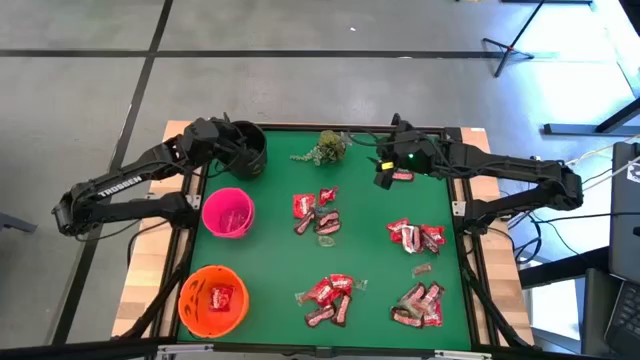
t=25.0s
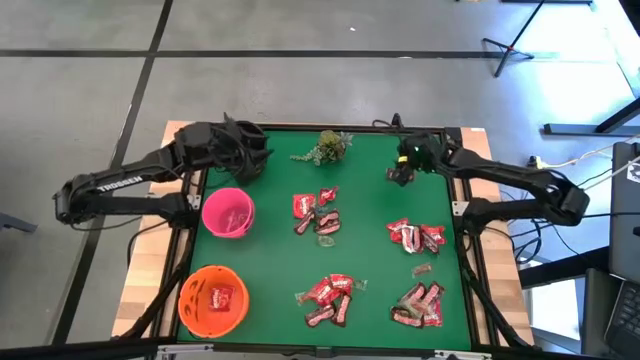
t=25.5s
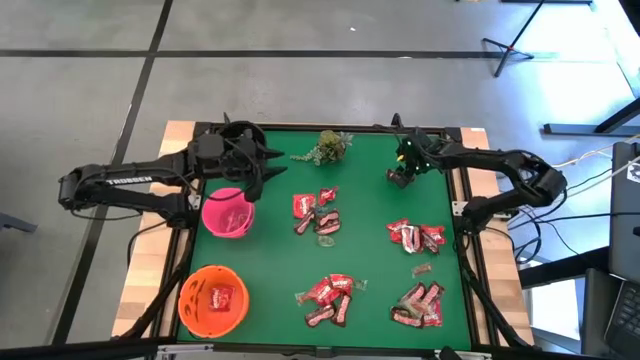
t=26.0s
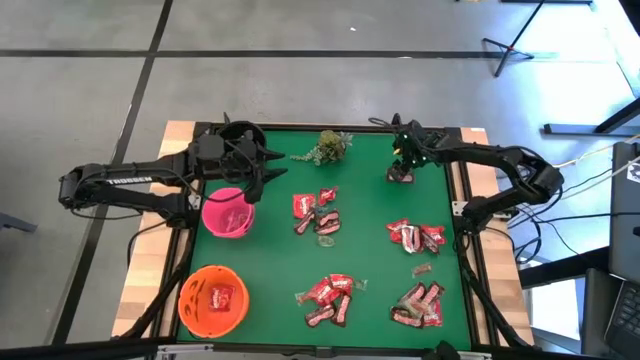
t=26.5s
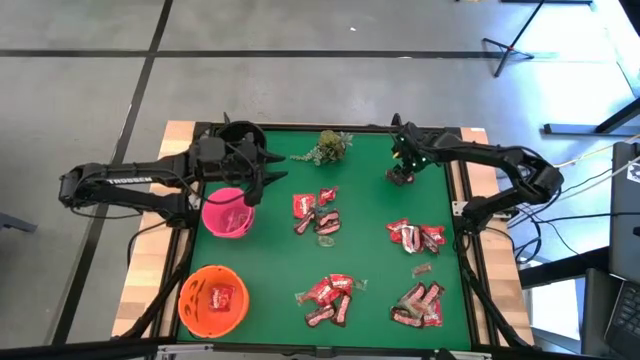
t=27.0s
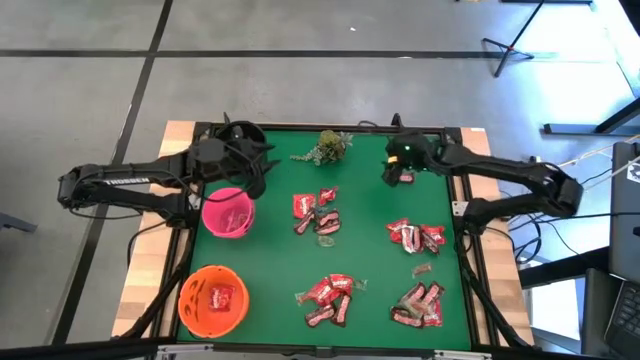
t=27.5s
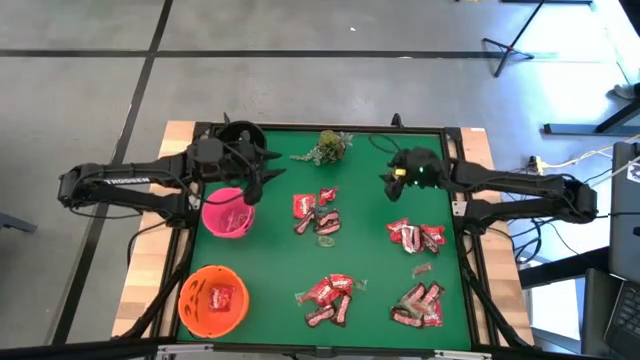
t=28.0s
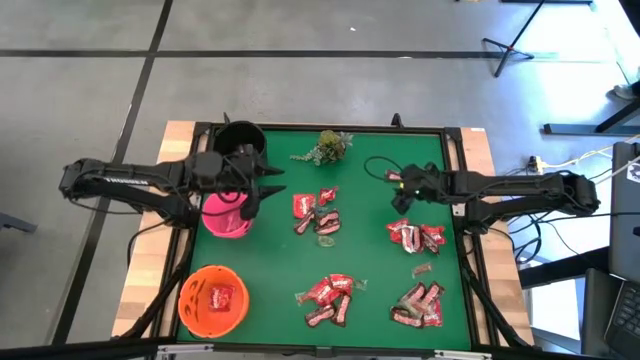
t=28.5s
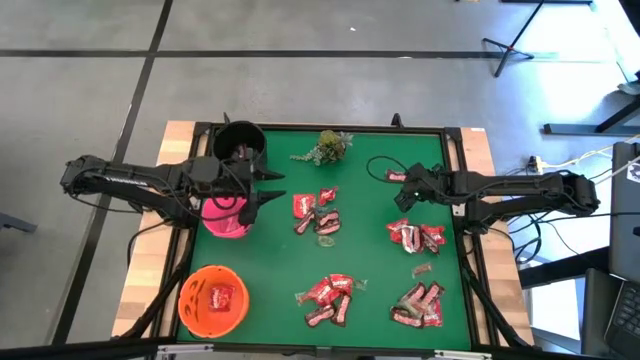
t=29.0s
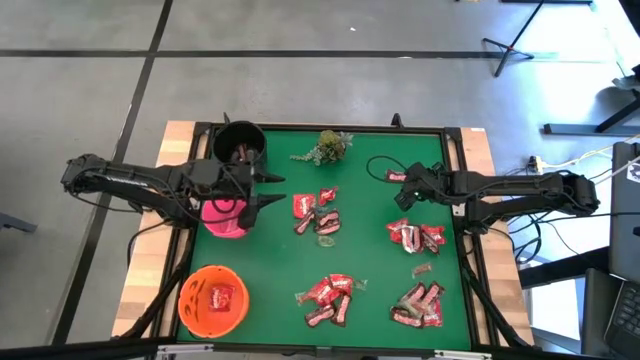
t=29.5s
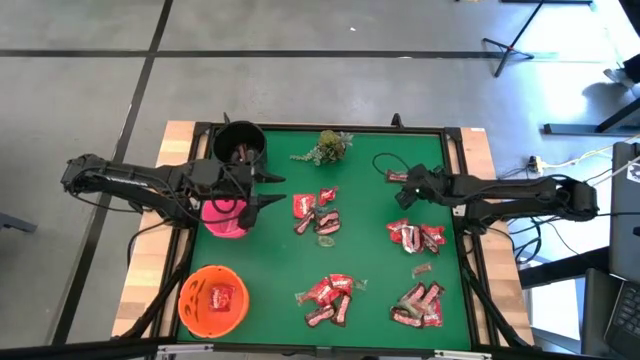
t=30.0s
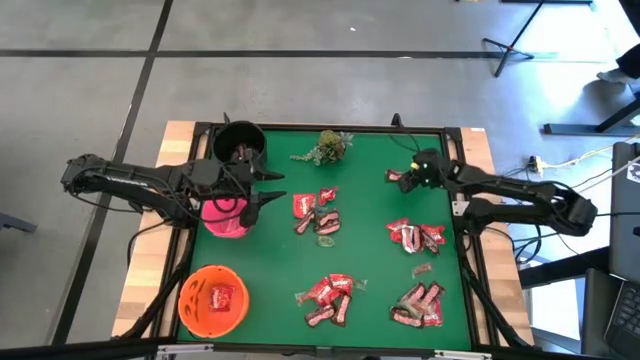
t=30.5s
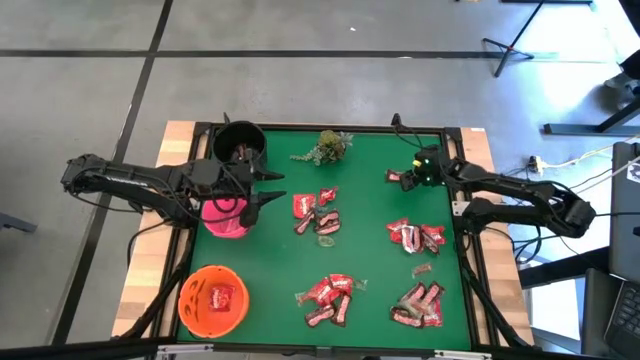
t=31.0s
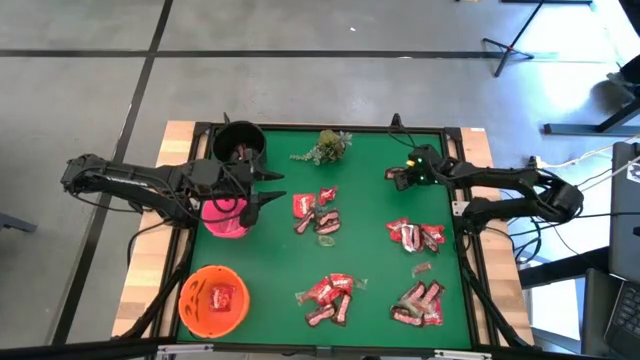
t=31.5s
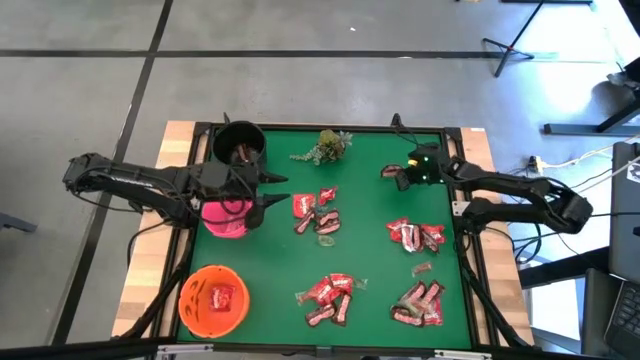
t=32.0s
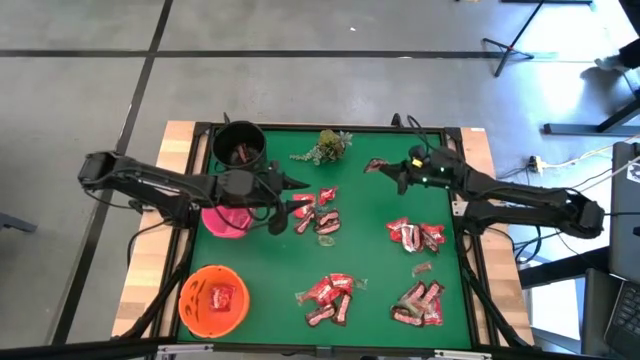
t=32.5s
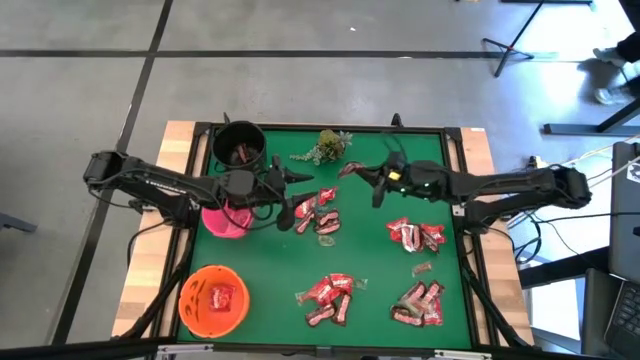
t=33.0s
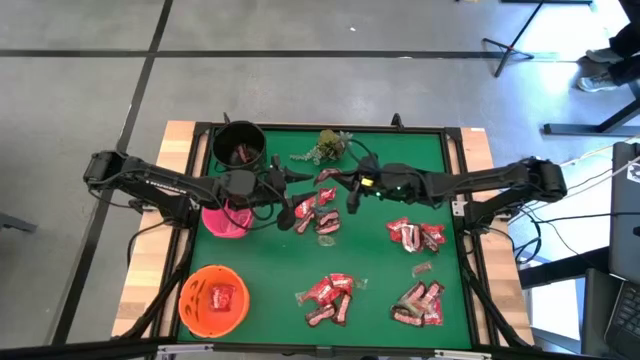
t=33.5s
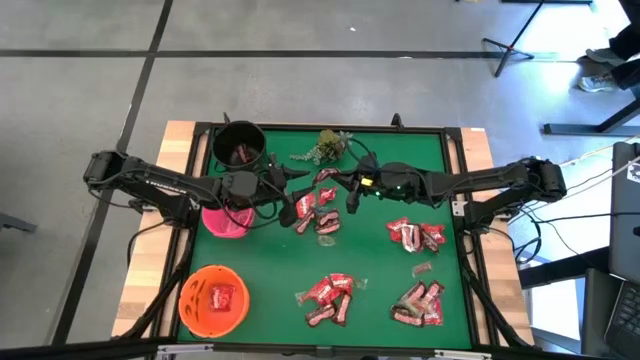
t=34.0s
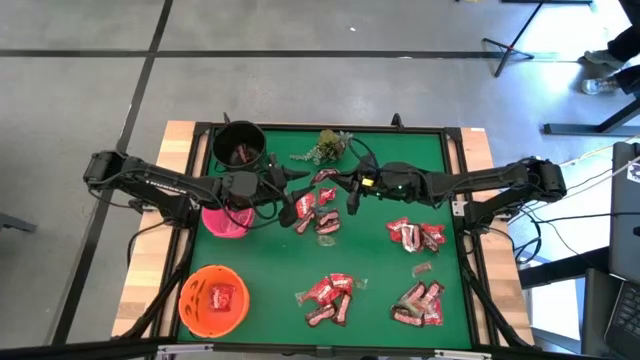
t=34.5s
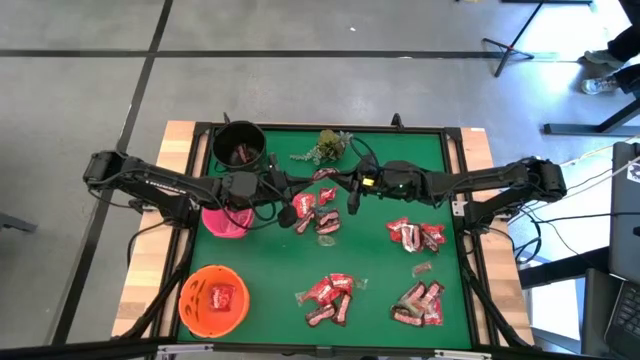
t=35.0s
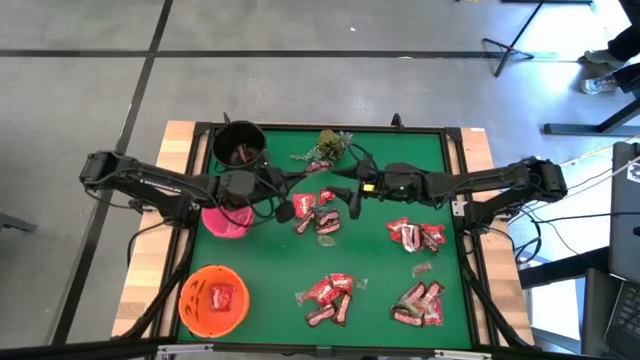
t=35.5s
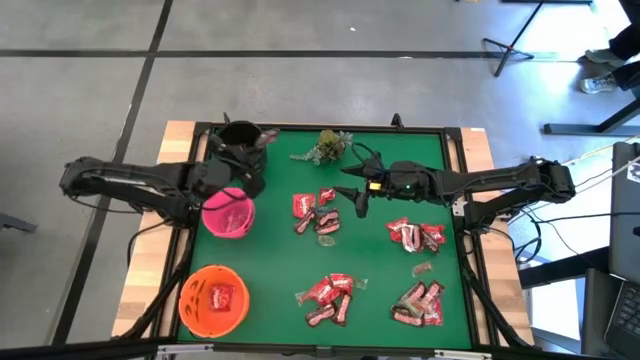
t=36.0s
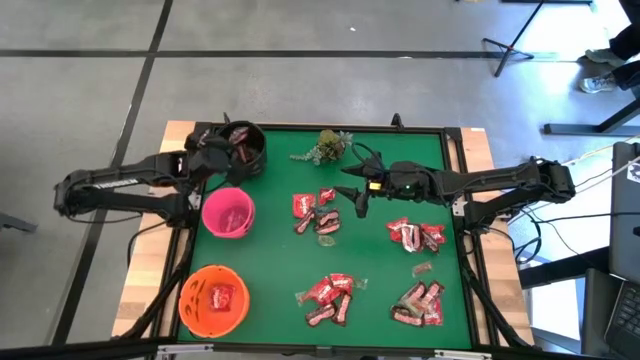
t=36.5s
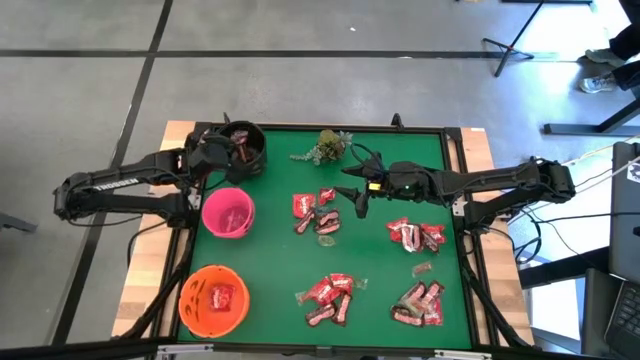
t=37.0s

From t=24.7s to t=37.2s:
Task: Sort candy
Put the brown chocolate into the black bucket

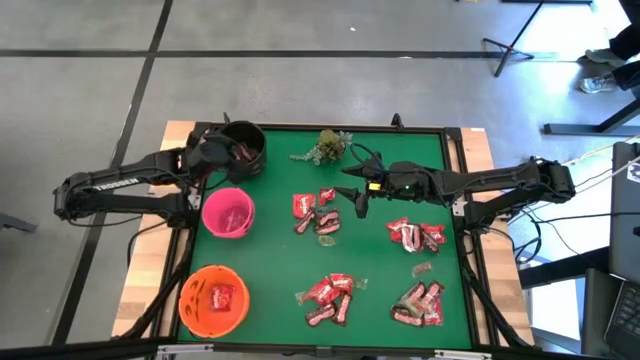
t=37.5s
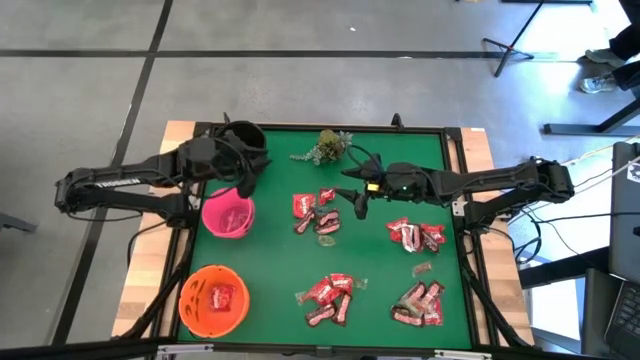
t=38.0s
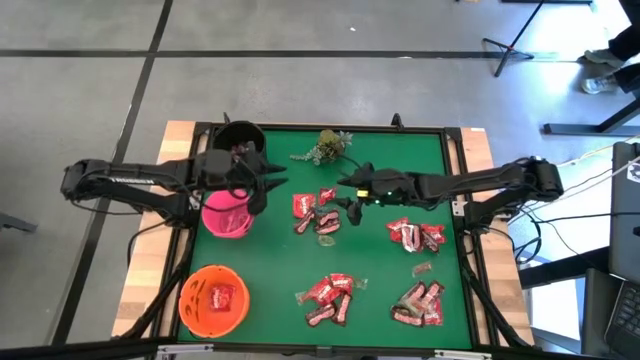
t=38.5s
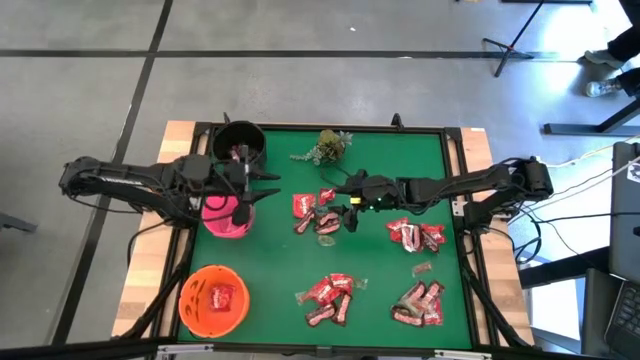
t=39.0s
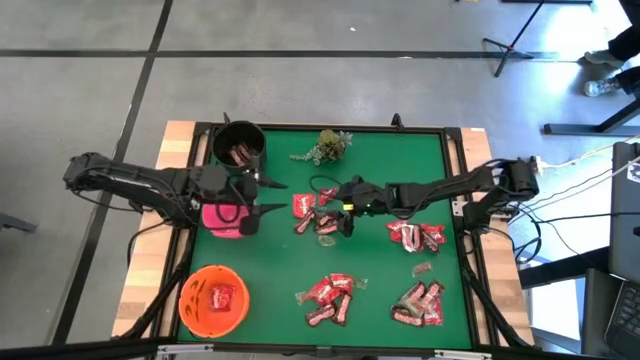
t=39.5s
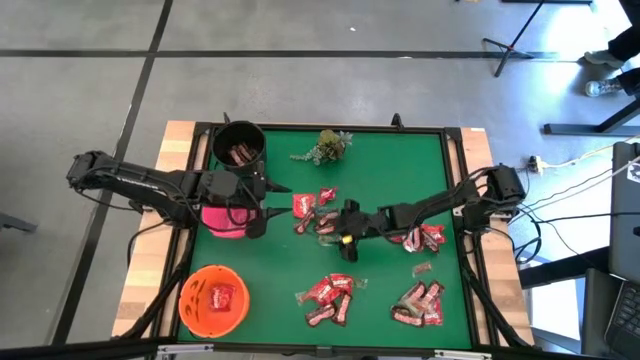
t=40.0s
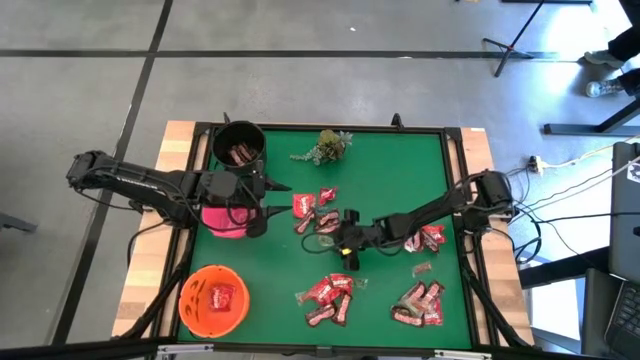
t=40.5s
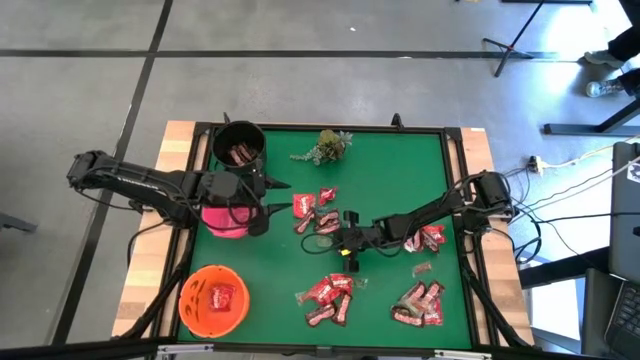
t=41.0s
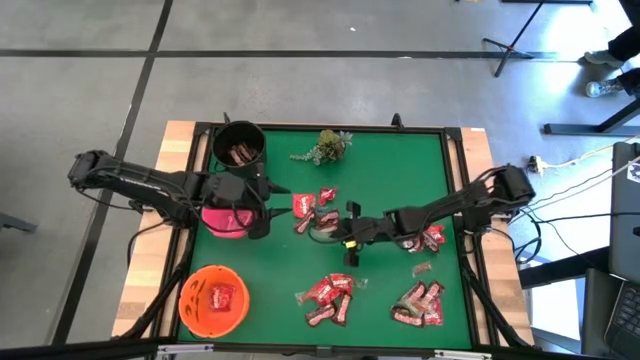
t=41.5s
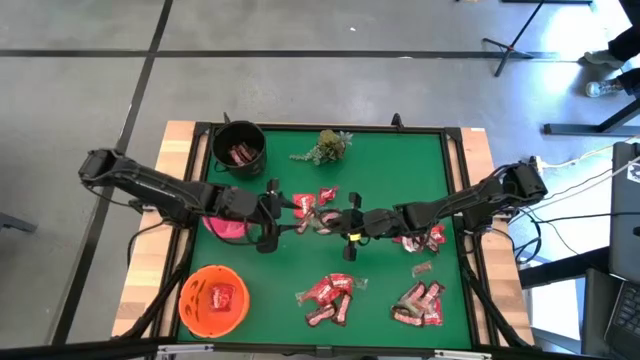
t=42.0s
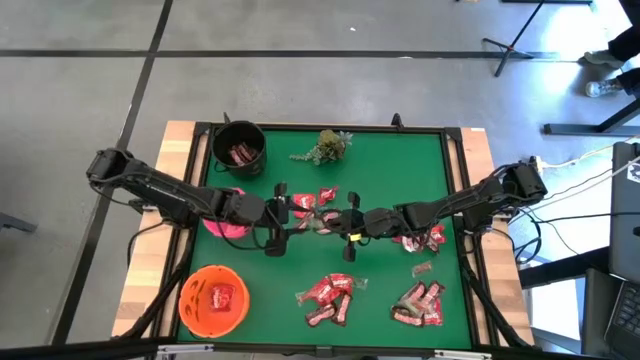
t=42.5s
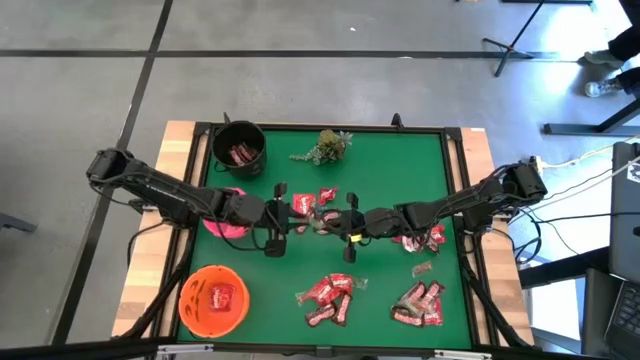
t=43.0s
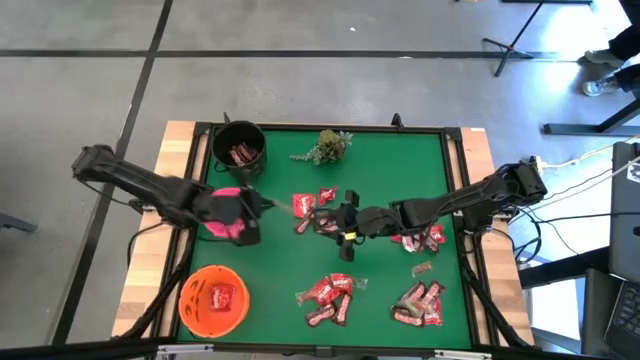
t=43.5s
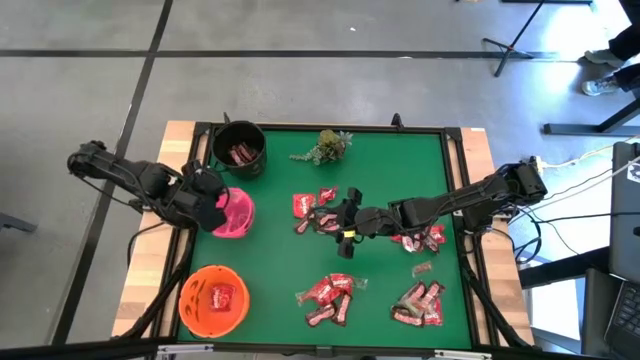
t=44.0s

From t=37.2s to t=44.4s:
Put the green gummy into the pink bucket

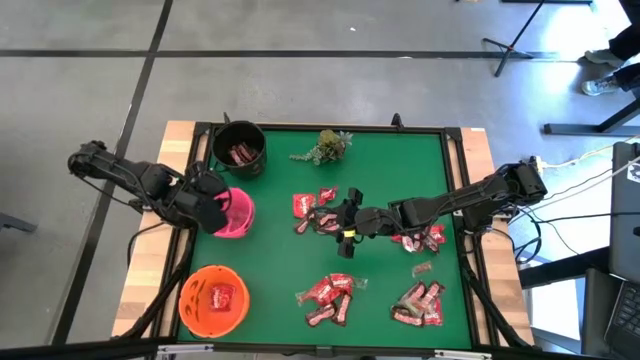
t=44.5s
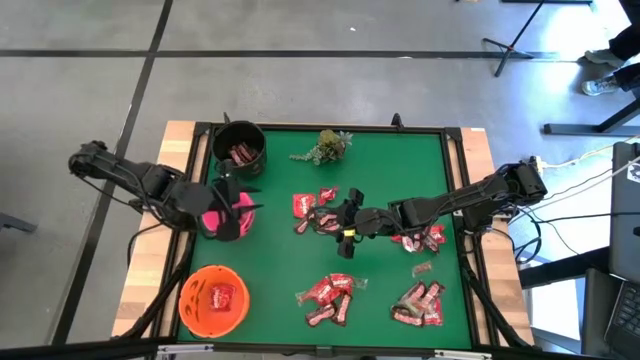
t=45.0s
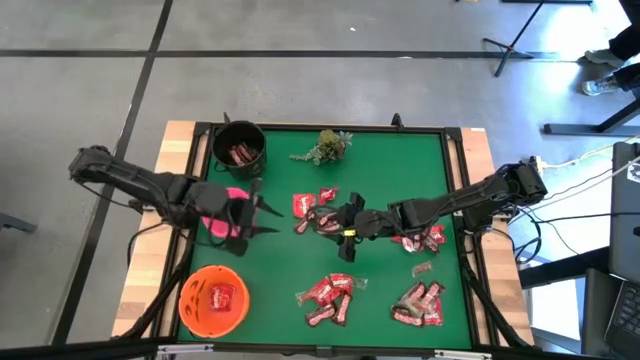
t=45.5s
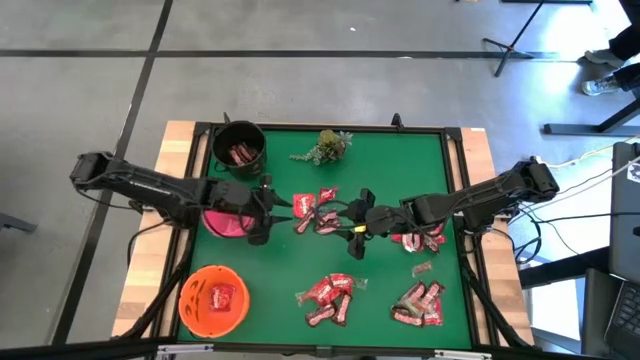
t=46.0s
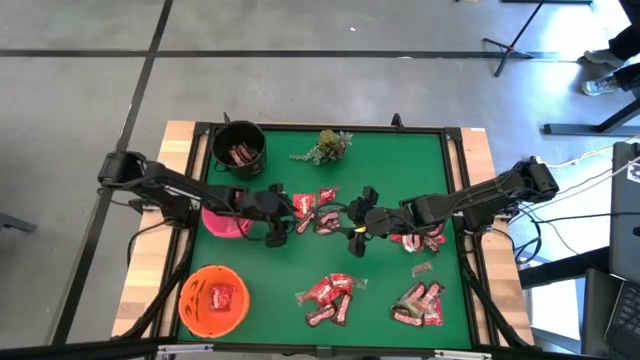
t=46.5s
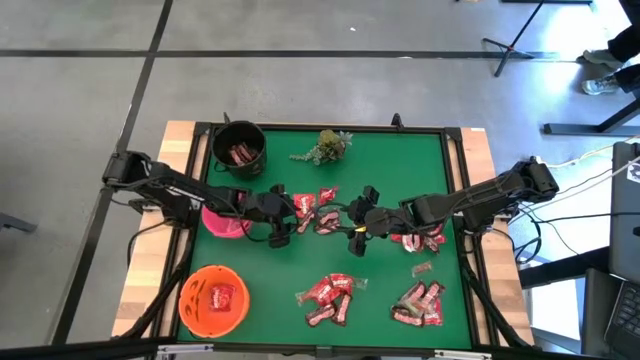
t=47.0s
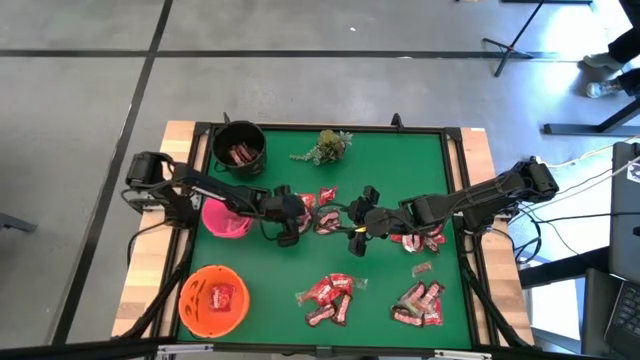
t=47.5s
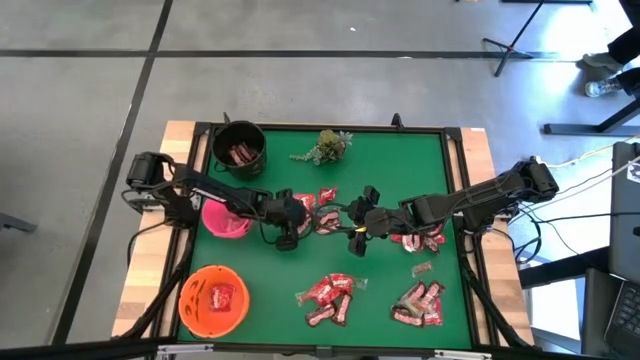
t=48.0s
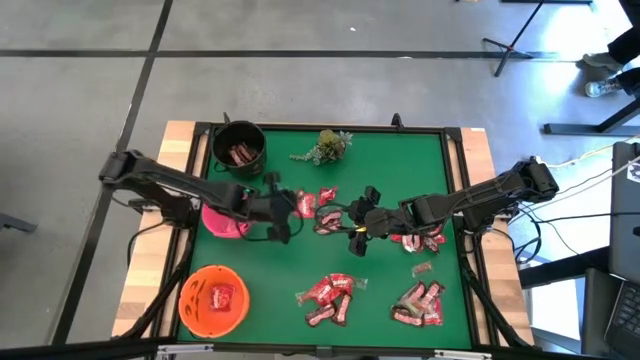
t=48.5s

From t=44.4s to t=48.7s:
Put the brown chocolate into the black bucket
